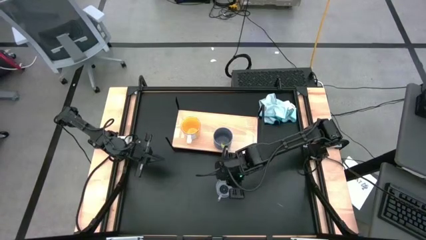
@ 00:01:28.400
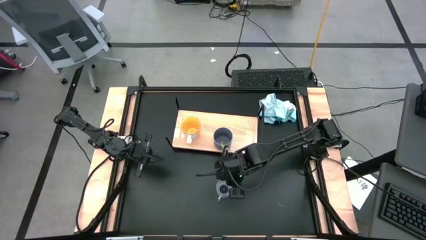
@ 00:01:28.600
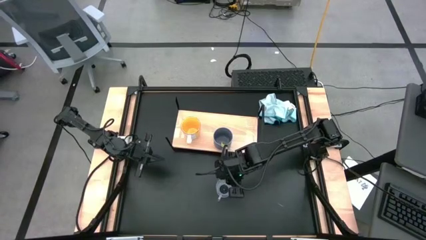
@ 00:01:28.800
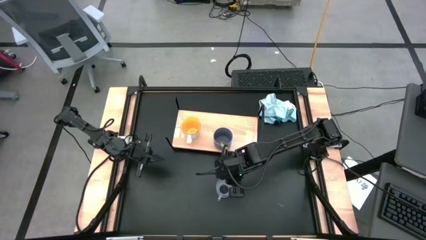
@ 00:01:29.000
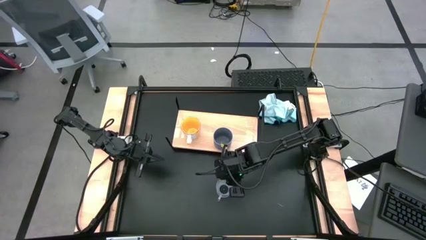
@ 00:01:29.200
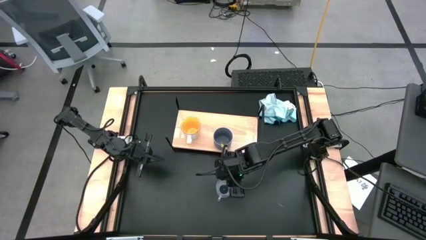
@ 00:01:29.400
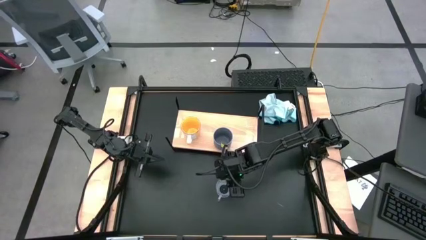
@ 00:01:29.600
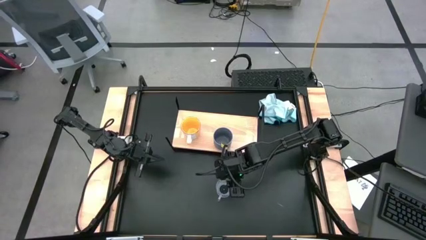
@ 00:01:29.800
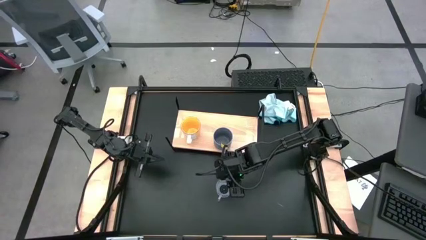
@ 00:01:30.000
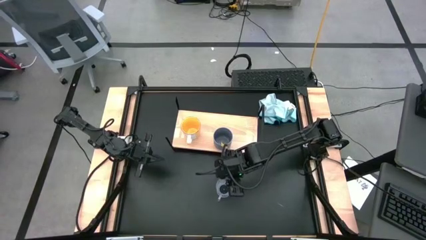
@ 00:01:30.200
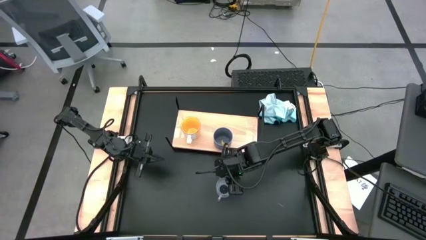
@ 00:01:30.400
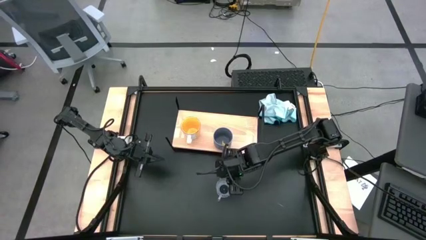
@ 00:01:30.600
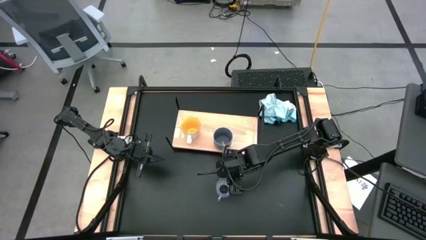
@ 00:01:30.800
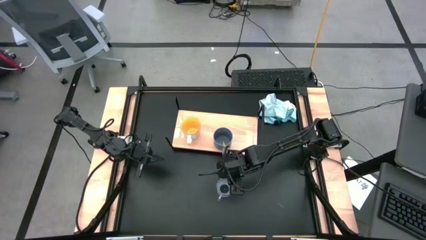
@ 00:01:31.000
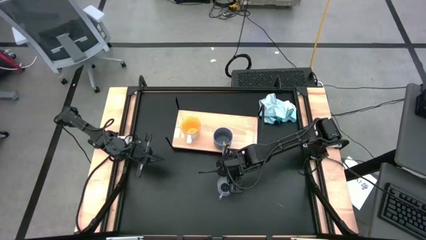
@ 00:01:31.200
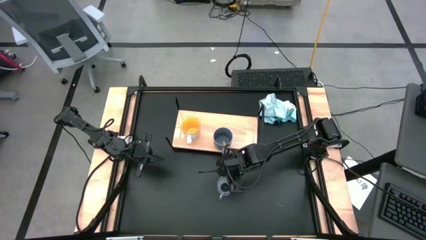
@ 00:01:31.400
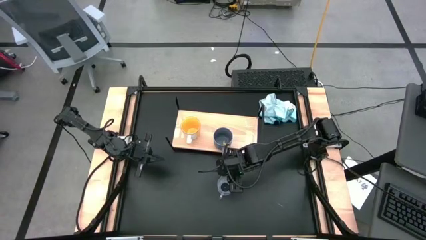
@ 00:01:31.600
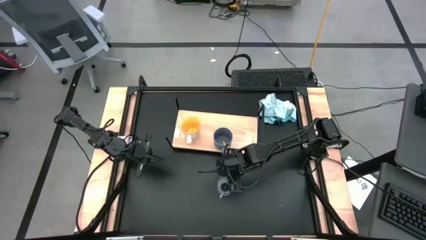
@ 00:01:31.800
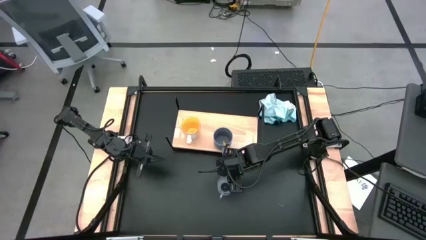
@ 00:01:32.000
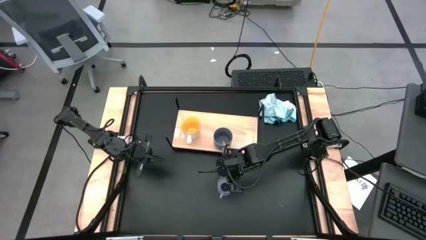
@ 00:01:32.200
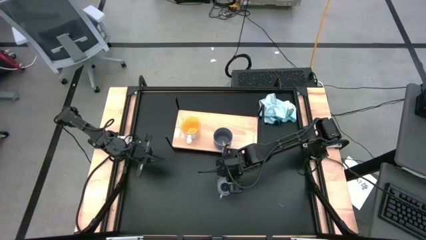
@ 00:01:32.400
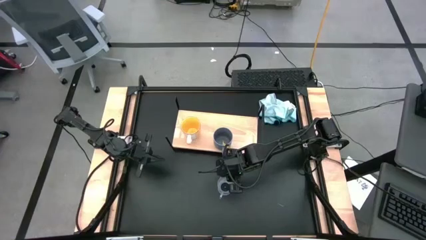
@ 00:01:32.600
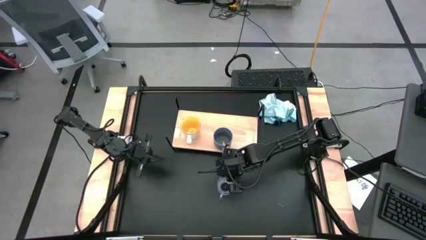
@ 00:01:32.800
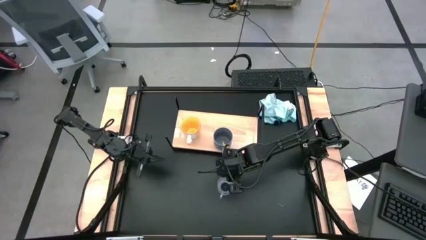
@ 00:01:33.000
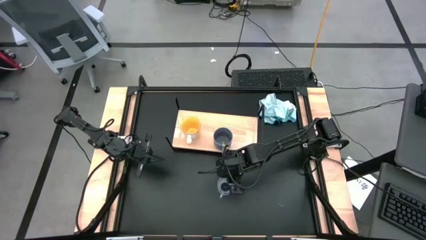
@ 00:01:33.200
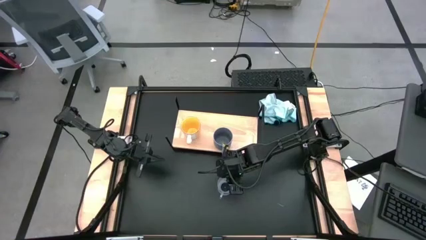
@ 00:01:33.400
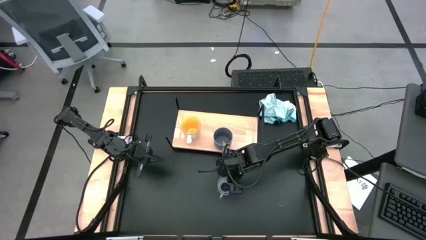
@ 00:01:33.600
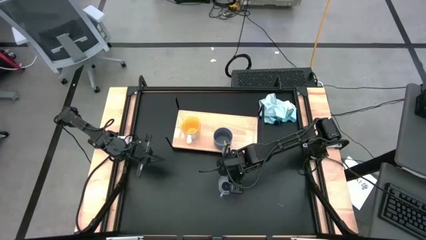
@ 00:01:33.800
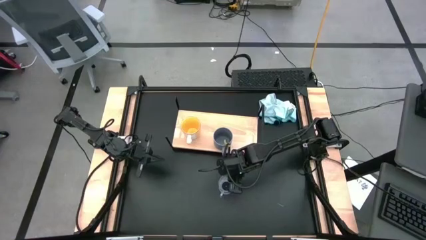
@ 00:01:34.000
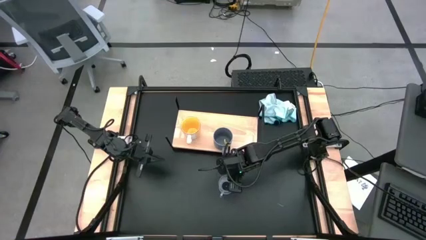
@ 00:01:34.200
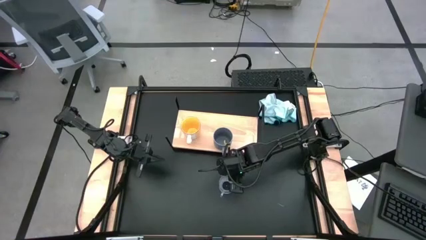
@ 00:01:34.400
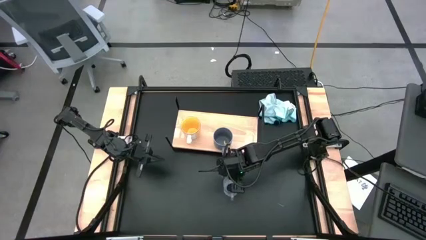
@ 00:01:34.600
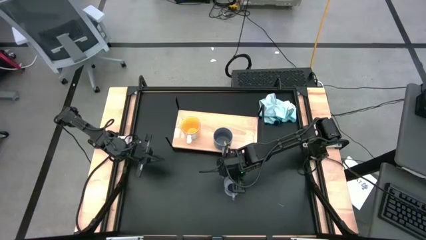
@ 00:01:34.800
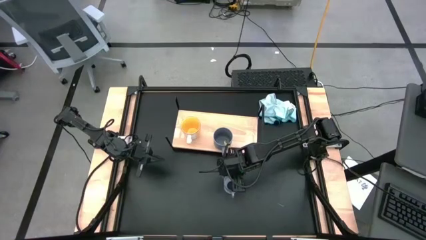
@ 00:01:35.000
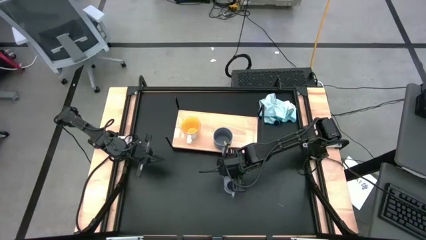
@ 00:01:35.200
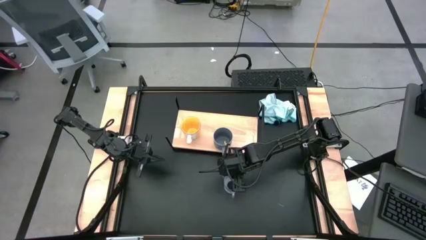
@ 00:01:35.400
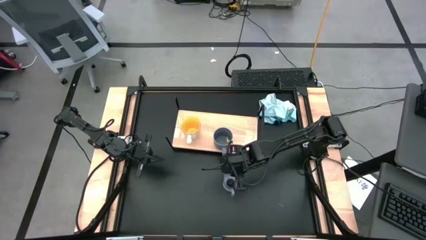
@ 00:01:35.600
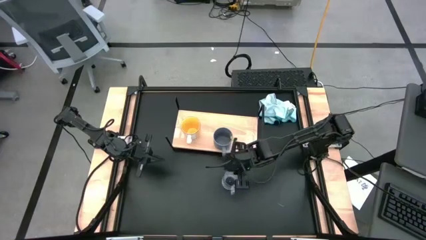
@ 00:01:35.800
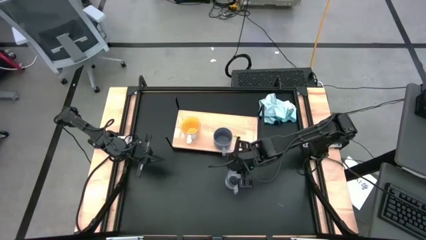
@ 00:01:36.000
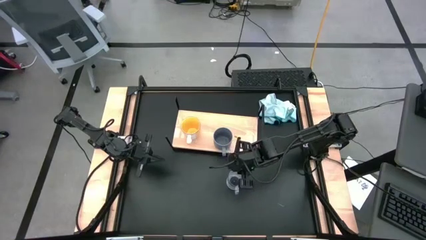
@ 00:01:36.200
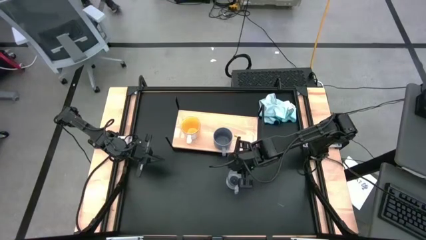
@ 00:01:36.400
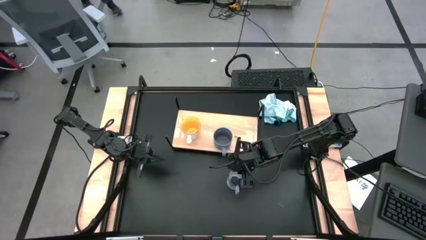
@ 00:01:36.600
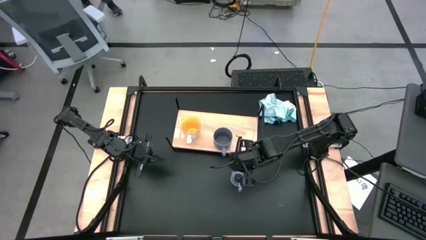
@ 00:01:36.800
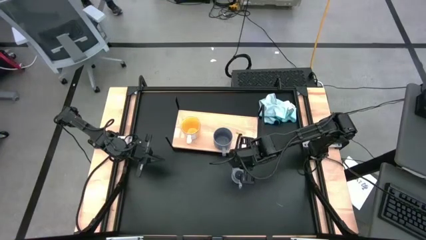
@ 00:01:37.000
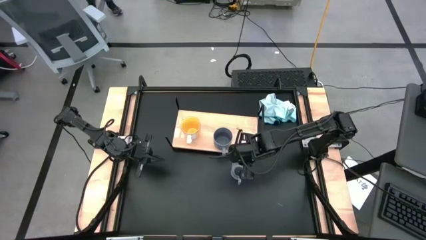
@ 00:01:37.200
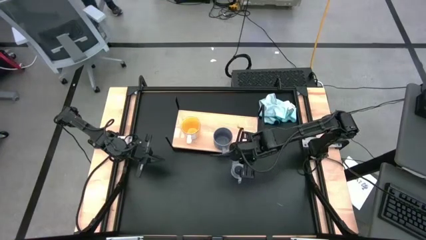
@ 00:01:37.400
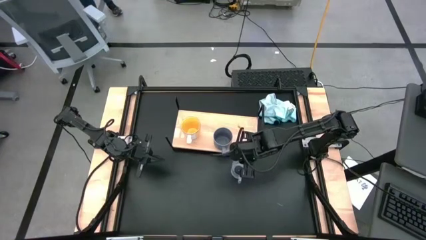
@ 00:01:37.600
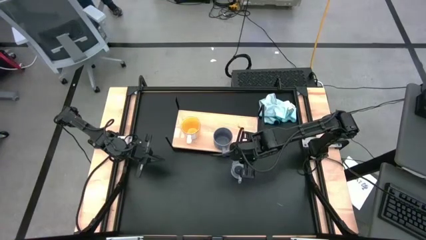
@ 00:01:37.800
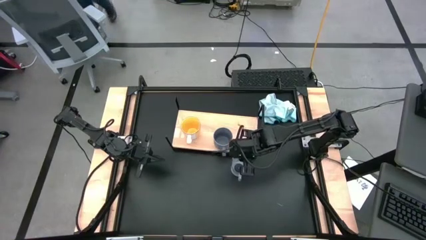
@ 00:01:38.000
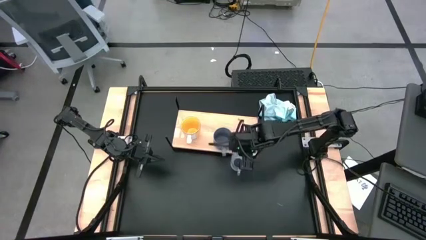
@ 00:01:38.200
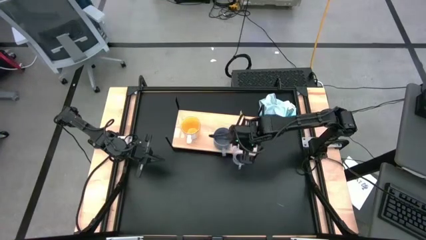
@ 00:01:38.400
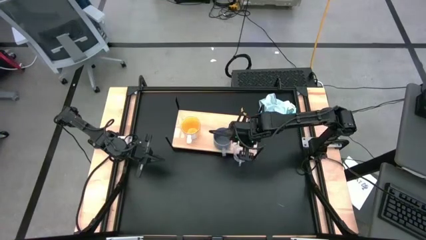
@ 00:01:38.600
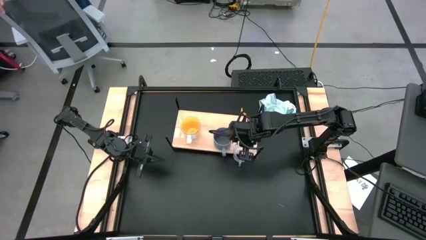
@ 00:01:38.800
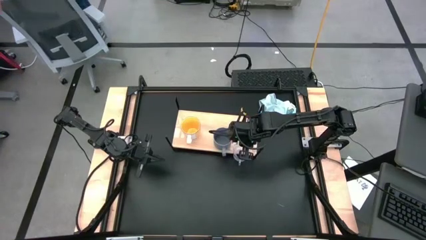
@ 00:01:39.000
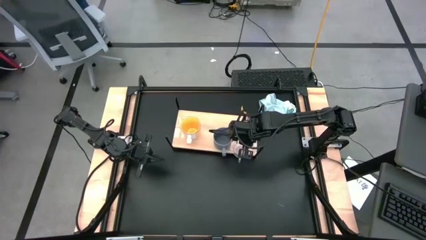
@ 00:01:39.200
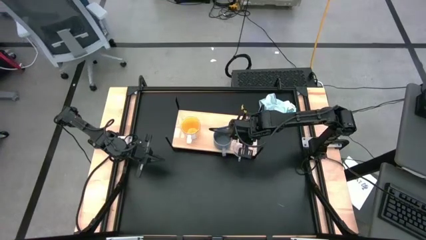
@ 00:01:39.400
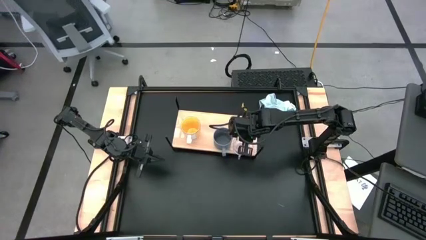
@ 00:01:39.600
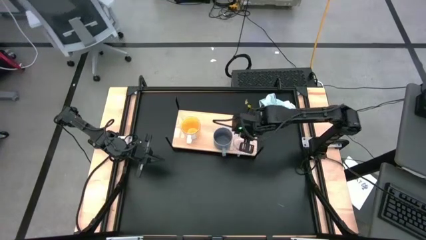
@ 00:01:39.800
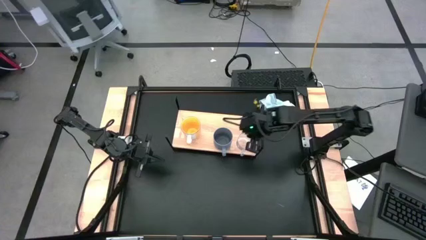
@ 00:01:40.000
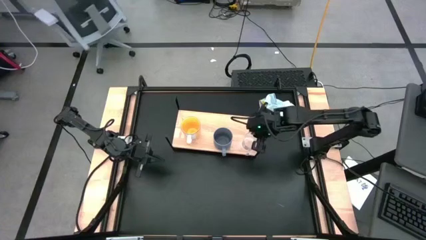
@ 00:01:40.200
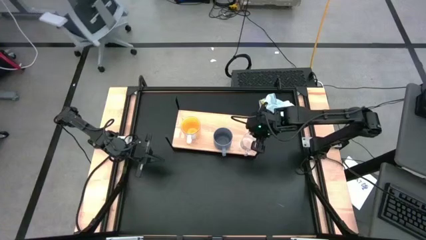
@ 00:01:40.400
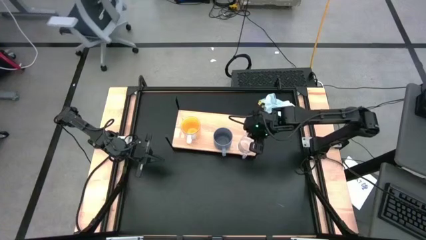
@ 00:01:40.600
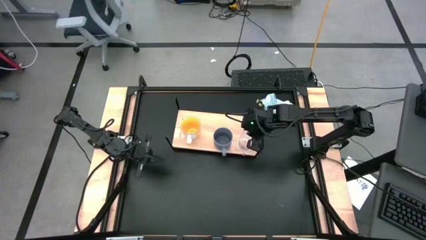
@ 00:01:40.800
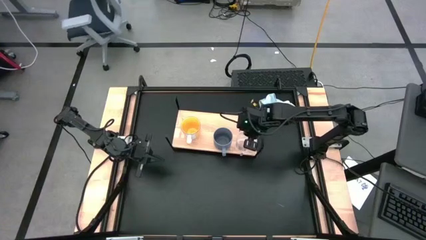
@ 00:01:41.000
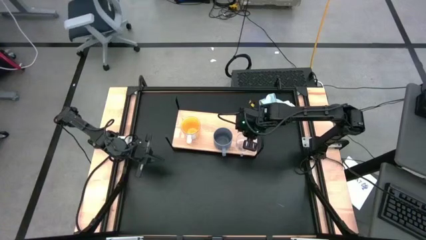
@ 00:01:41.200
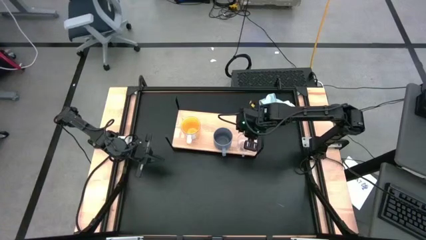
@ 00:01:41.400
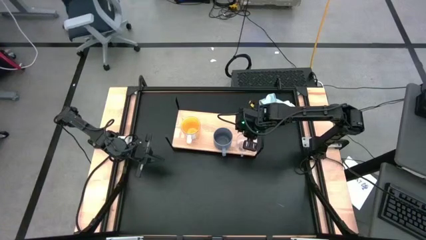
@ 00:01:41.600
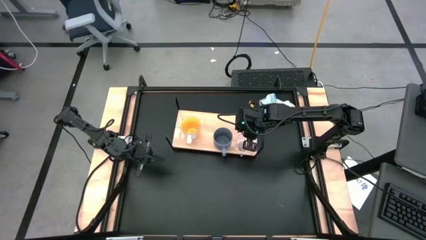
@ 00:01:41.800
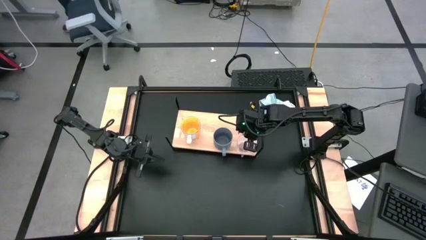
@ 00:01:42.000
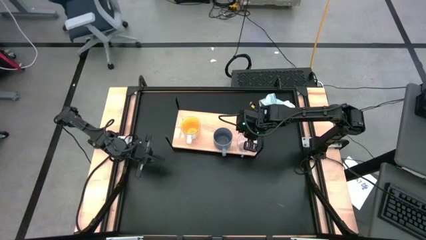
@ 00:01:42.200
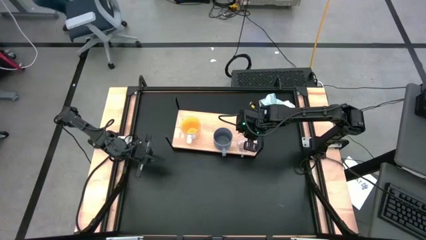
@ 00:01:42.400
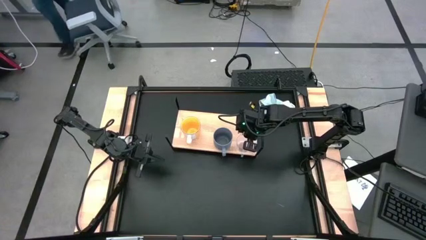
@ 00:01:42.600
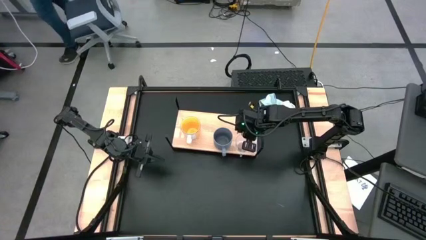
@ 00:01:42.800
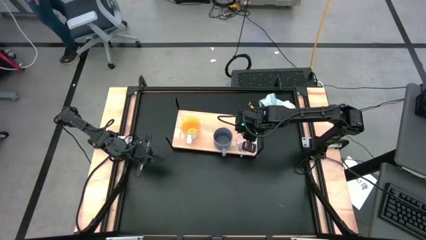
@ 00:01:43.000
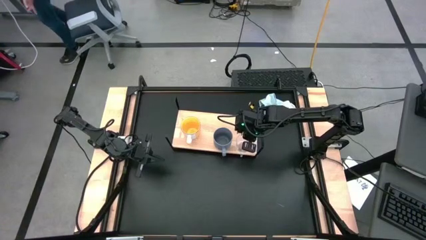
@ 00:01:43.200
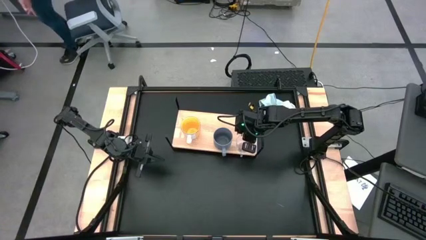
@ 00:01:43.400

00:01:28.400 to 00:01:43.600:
Task: Stack small to large cups/mugs on shelf
Put the transparent mug on the shelf
